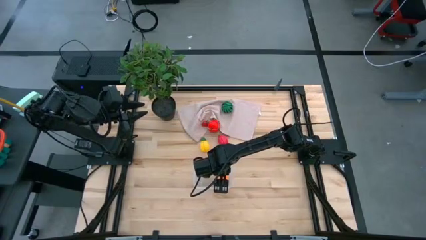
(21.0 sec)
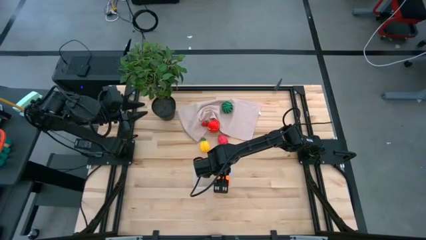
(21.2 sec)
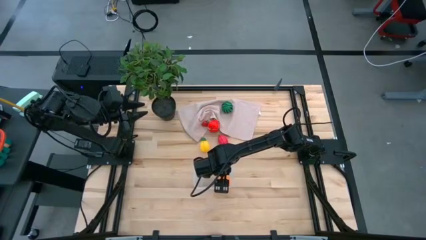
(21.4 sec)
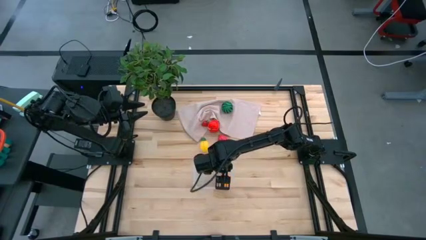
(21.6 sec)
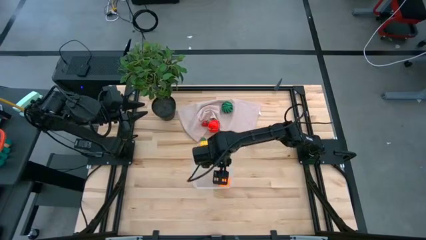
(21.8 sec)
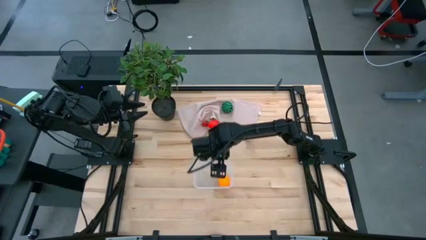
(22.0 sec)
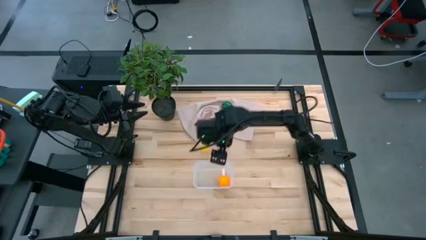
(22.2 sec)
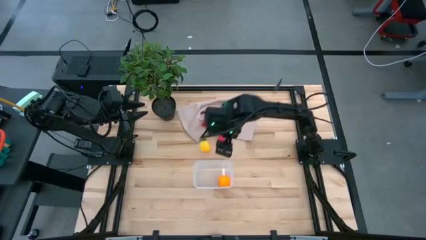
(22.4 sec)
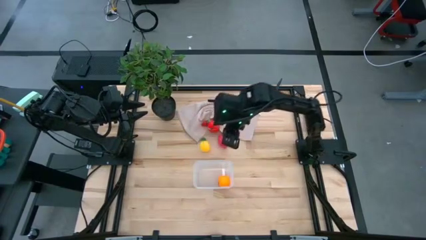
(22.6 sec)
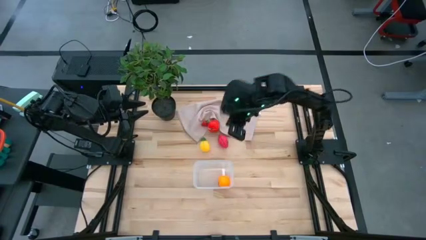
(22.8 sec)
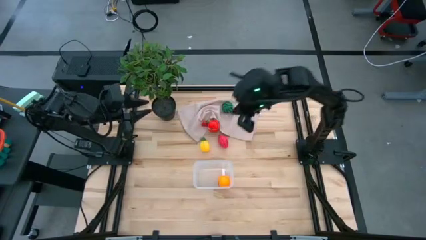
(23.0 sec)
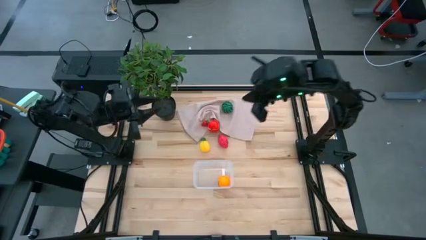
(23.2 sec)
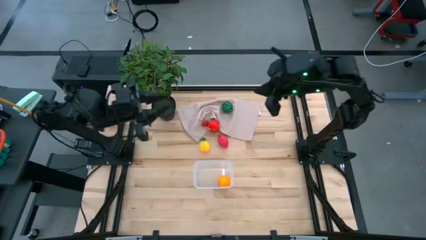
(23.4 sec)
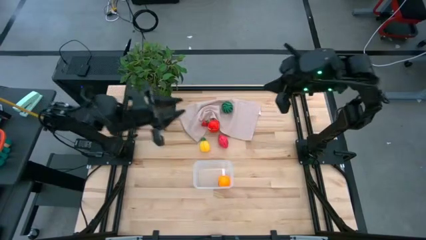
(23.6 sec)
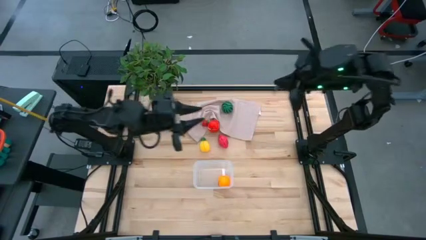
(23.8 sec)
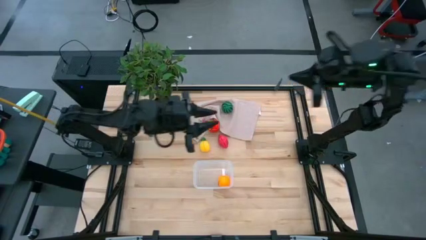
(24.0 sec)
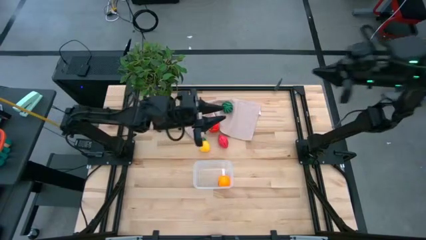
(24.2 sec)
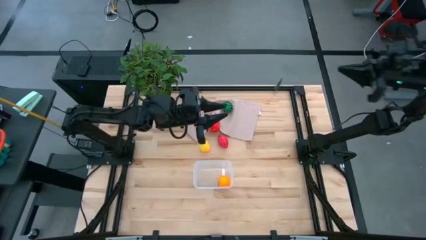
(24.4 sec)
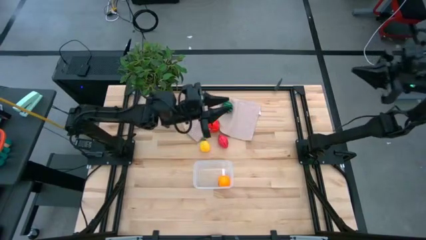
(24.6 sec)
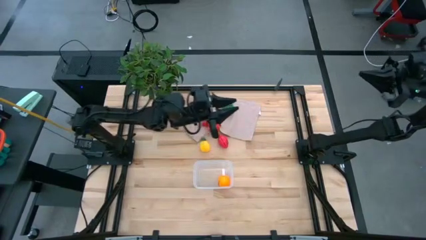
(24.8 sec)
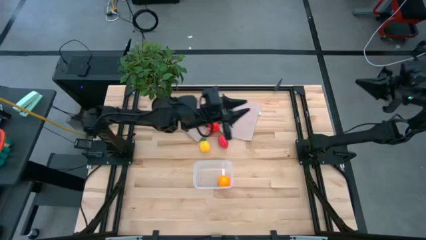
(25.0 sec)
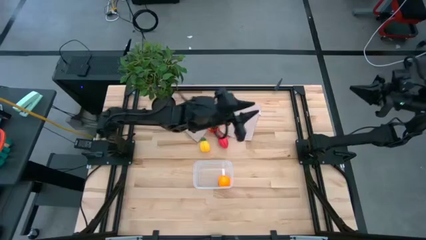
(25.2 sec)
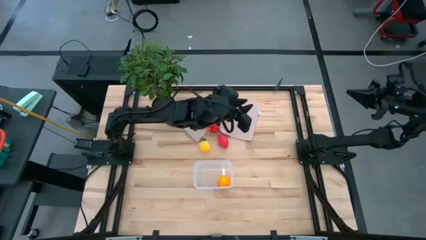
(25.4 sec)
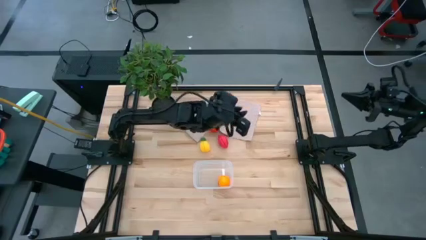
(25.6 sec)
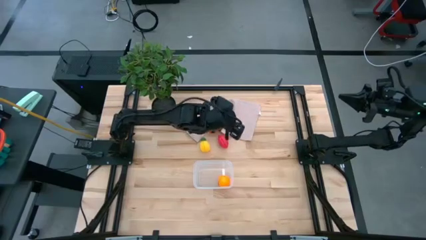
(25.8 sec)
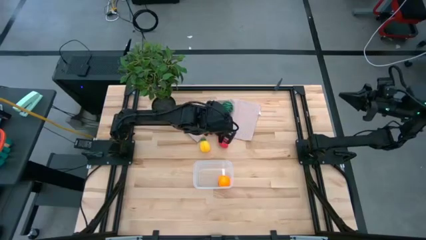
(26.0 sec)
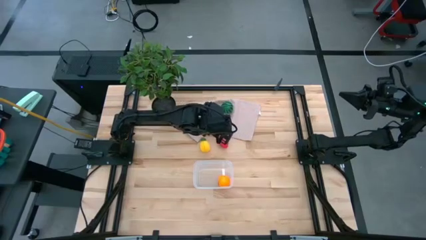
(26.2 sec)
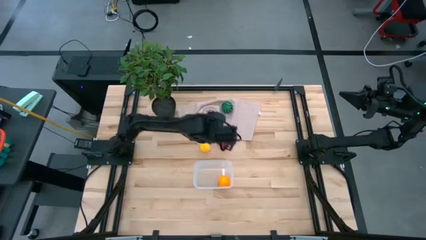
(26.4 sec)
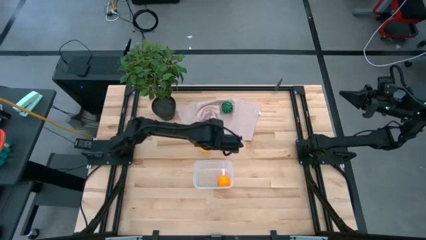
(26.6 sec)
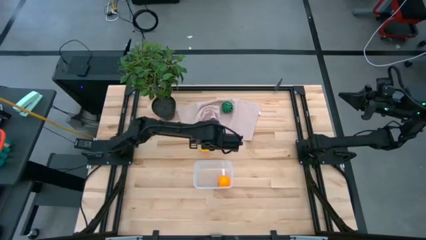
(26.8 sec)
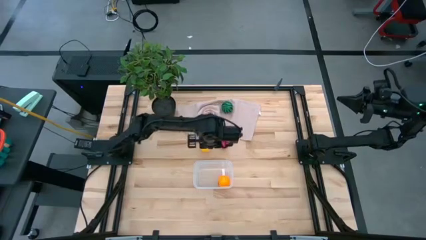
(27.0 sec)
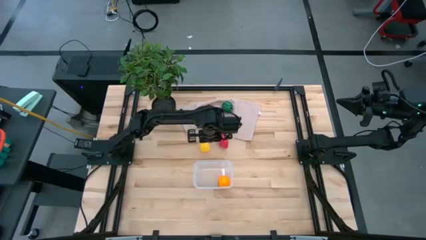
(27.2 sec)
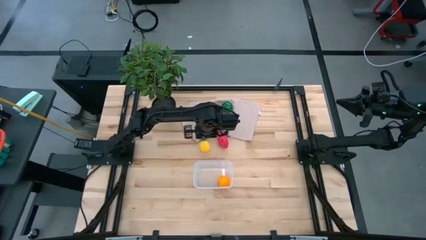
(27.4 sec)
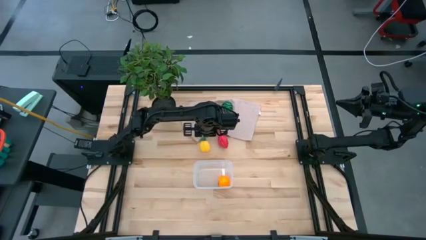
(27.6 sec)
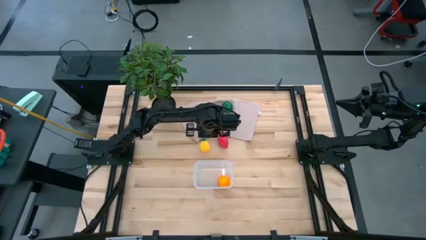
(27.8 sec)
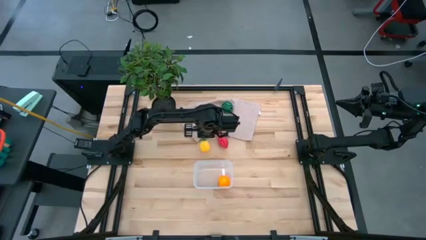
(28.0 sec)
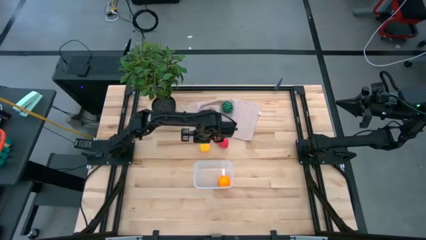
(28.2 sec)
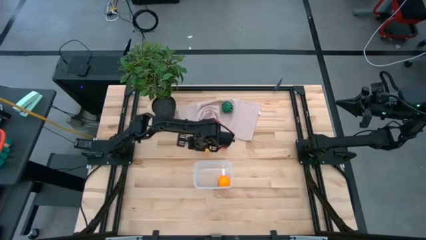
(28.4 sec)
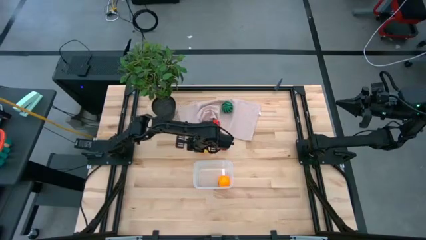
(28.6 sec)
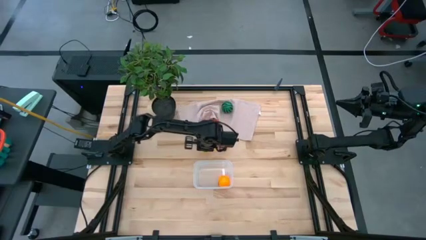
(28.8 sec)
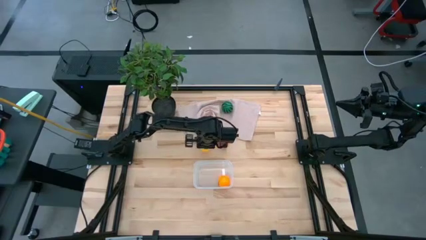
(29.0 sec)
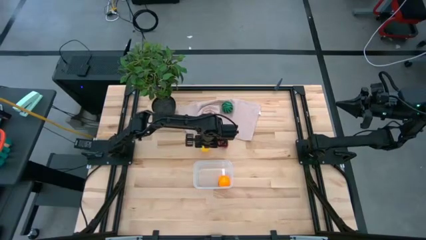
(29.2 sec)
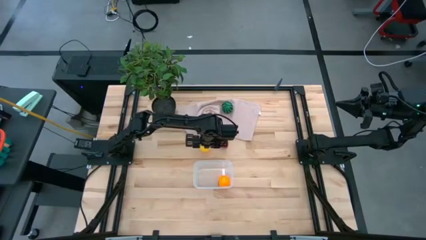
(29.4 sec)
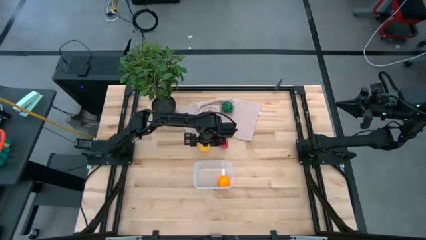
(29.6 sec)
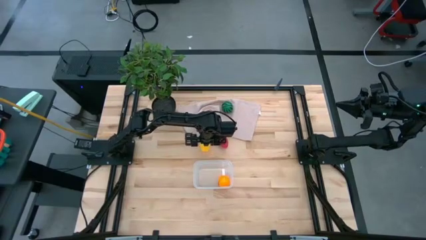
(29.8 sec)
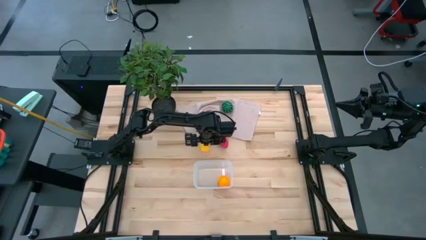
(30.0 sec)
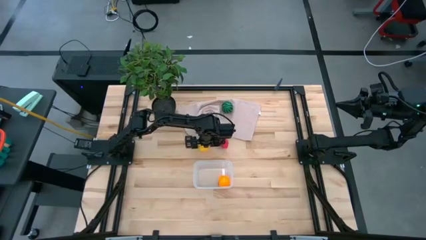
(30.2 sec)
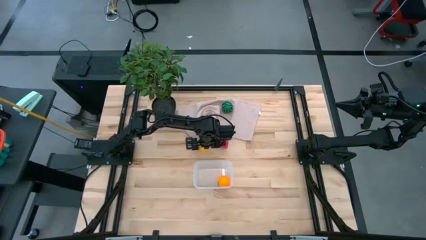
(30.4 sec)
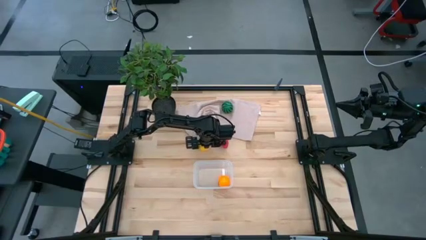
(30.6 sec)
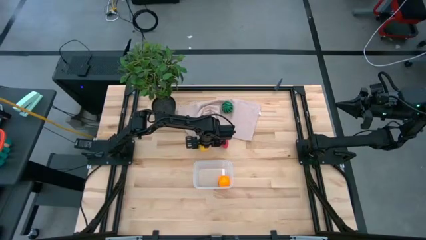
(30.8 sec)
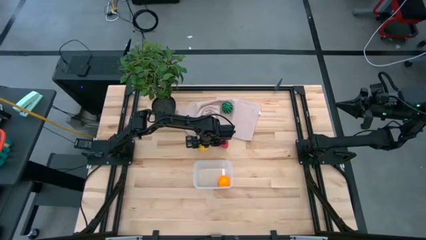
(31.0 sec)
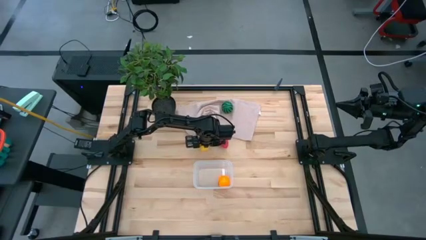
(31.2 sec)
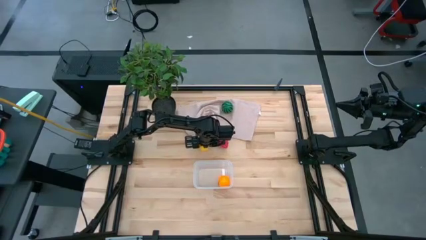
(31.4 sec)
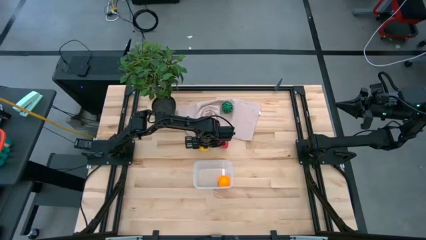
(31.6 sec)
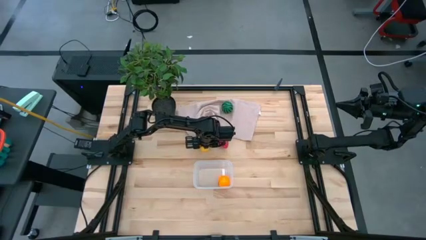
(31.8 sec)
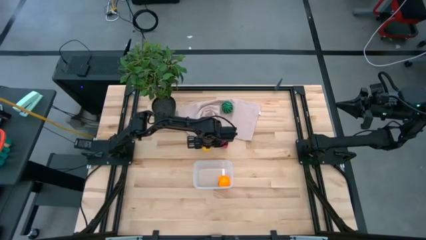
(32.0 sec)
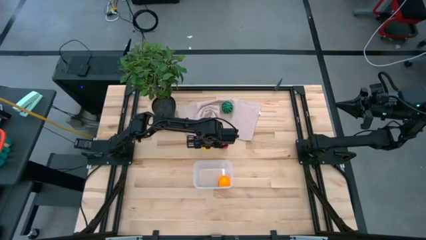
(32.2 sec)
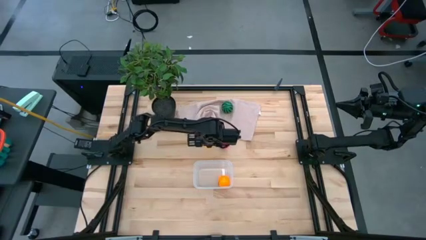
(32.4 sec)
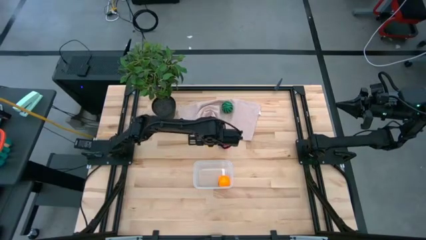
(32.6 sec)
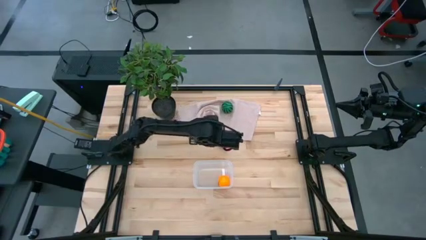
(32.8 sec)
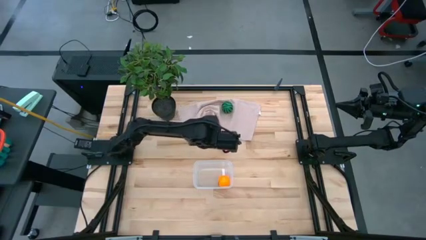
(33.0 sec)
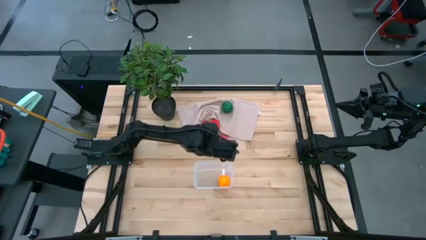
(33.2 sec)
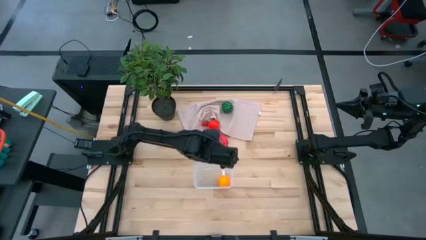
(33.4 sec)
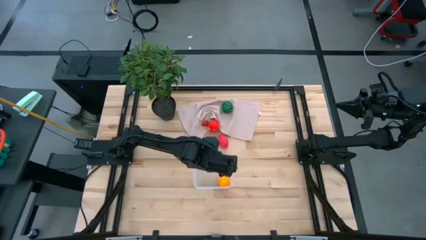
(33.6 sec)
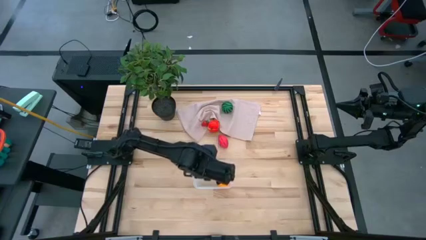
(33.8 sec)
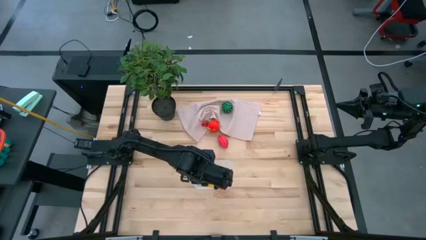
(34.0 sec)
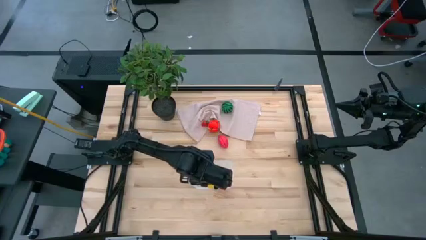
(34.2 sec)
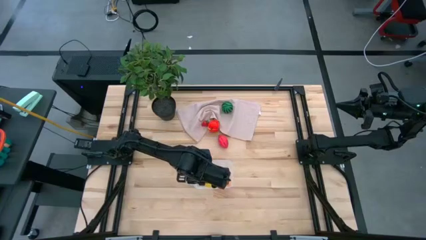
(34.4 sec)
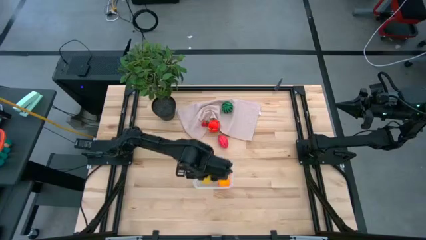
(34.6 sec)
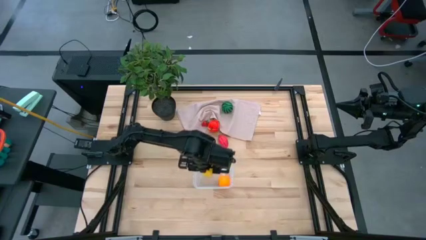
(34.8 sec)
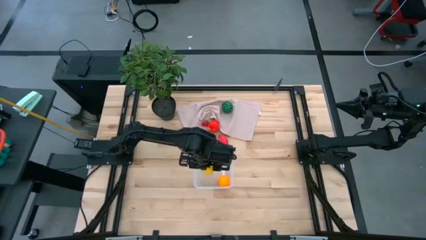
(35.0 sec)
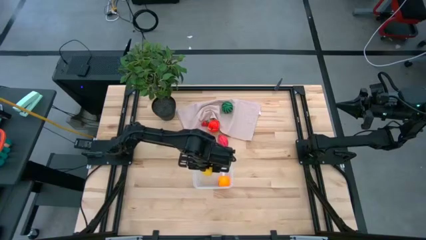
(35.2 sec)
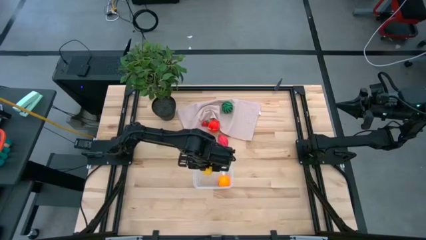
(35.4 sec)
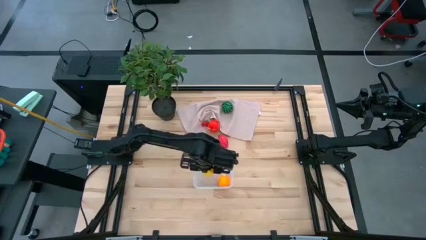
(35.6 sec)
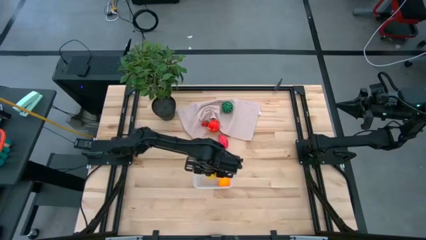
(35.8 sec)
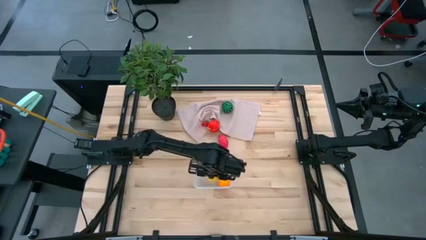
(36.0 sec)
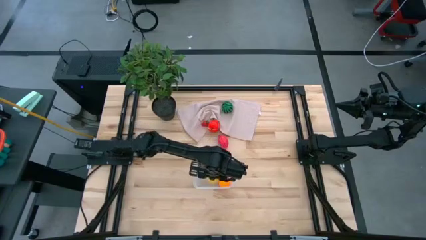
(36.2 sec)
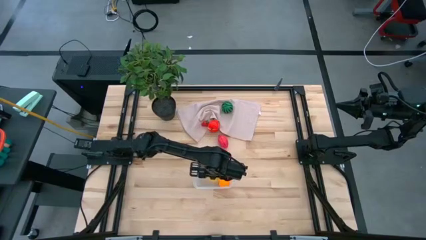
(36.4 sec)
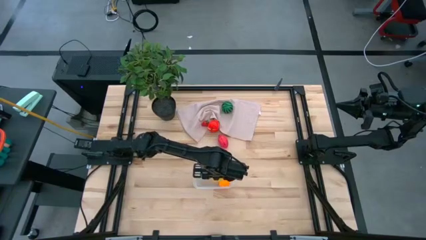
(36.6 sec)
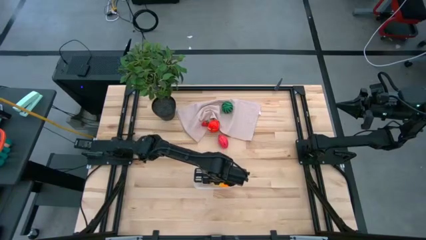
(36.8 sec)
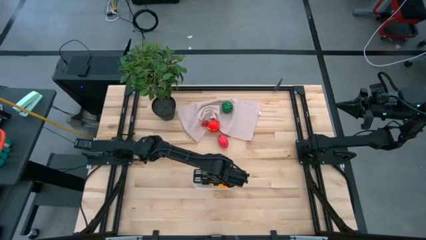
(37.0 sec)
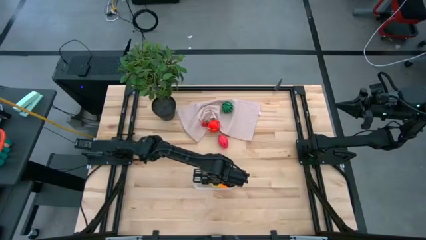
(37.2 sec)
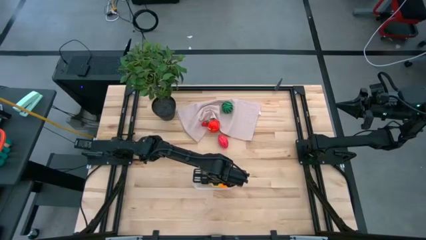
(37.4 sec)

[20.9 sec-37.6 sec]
Task: Pick and placing Produce into tupperware
Put the pineapple into the transparent bin
